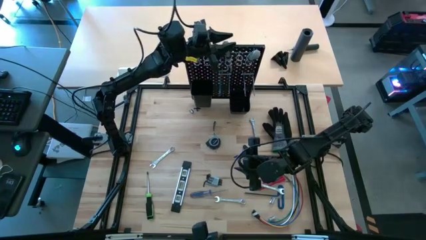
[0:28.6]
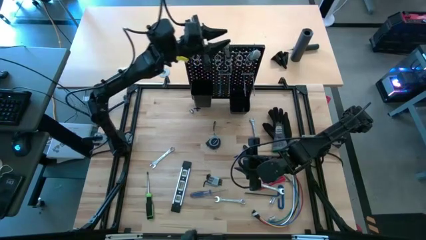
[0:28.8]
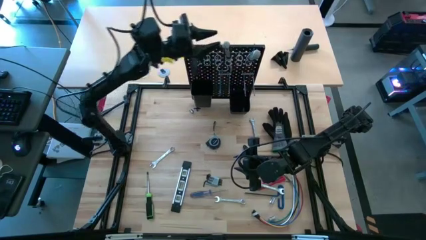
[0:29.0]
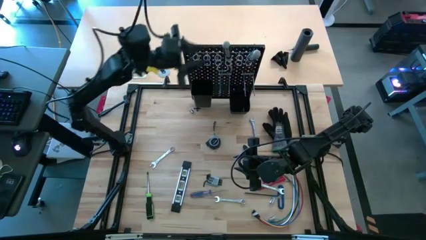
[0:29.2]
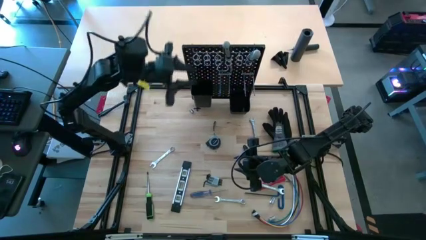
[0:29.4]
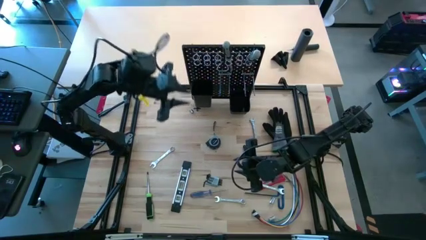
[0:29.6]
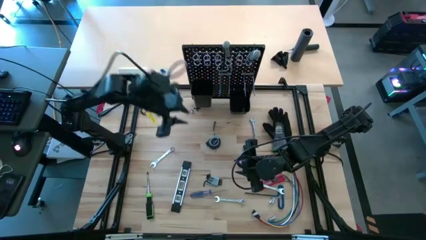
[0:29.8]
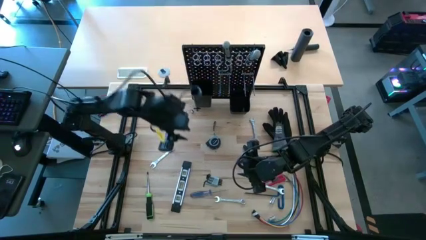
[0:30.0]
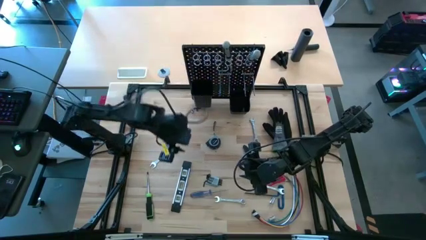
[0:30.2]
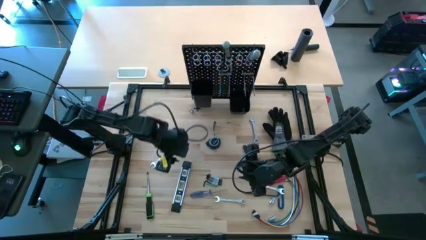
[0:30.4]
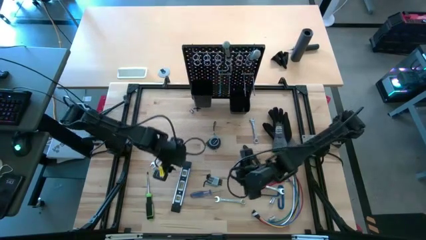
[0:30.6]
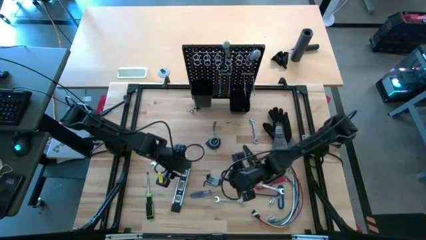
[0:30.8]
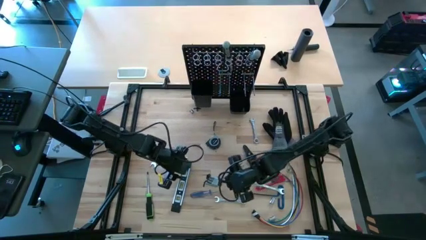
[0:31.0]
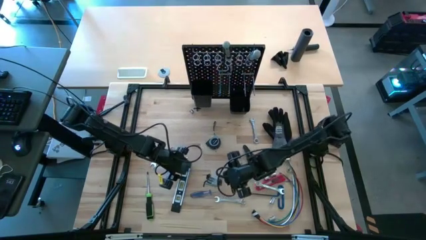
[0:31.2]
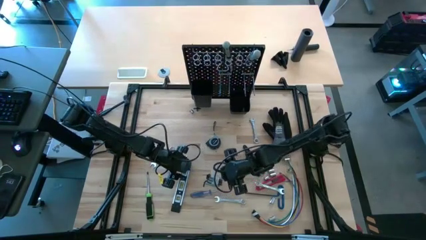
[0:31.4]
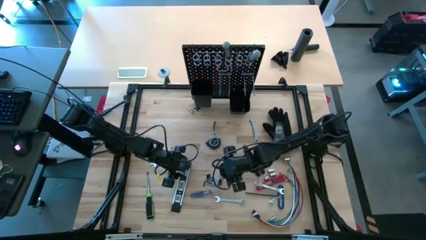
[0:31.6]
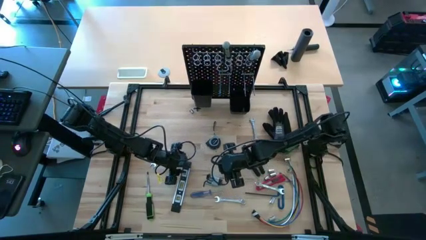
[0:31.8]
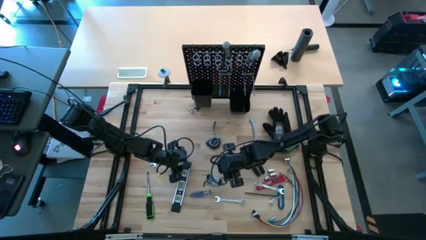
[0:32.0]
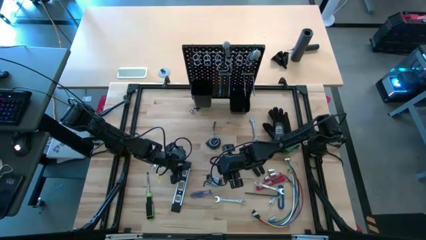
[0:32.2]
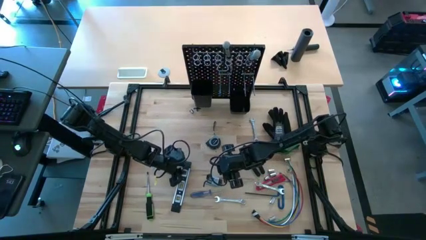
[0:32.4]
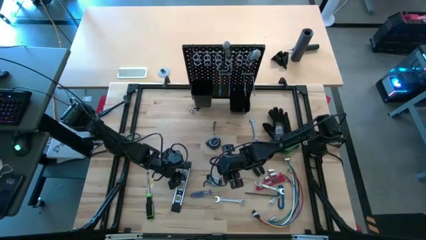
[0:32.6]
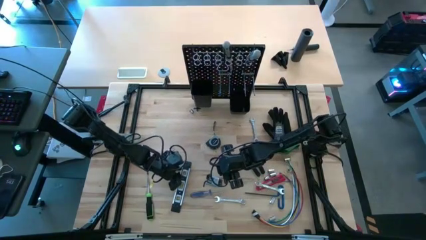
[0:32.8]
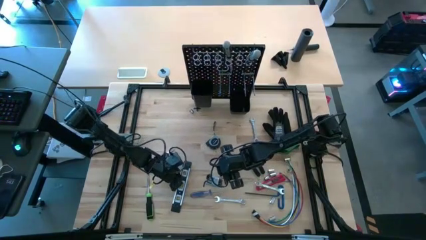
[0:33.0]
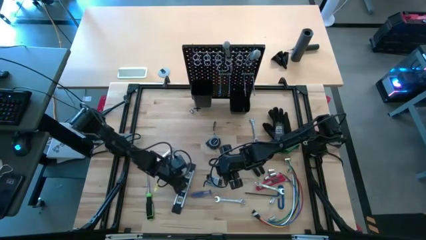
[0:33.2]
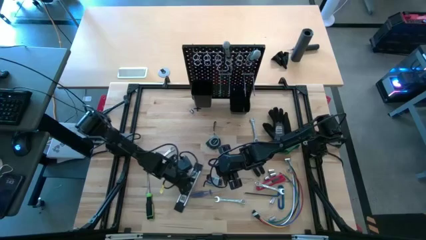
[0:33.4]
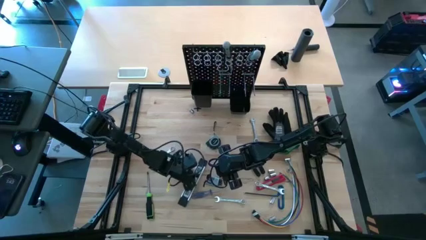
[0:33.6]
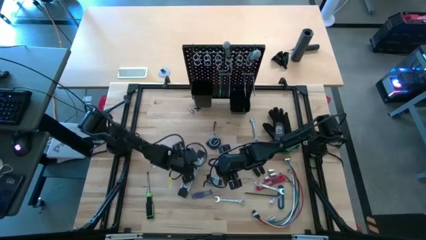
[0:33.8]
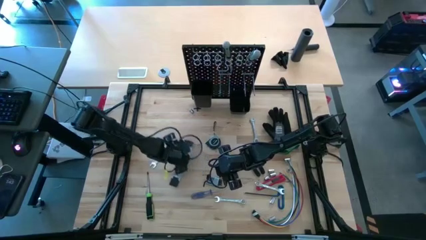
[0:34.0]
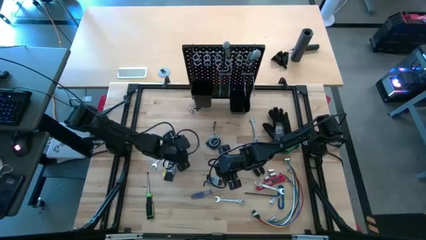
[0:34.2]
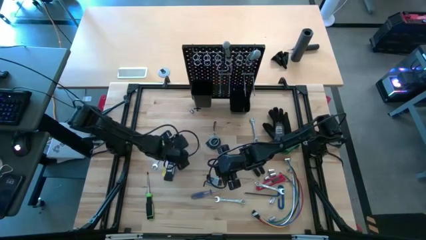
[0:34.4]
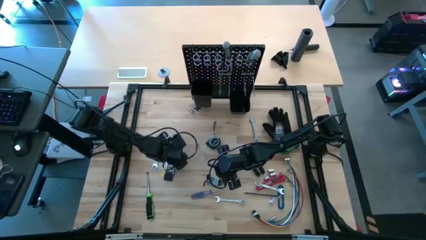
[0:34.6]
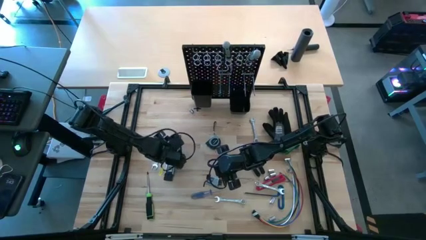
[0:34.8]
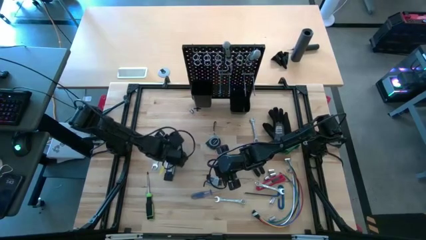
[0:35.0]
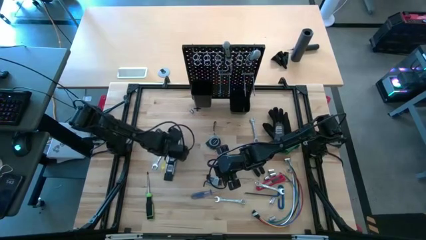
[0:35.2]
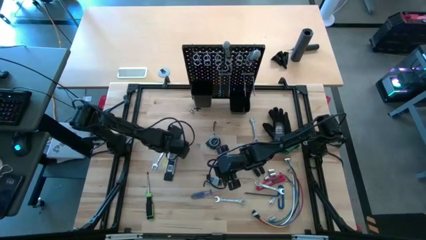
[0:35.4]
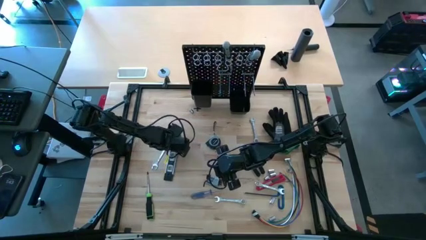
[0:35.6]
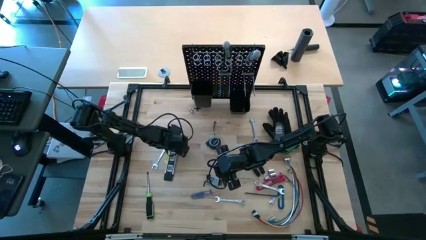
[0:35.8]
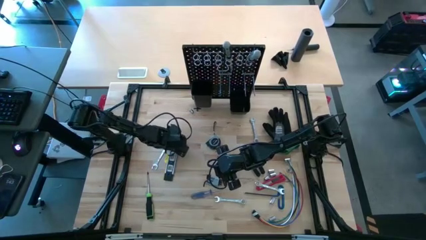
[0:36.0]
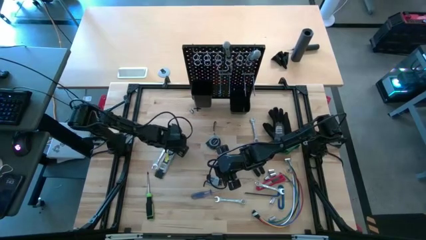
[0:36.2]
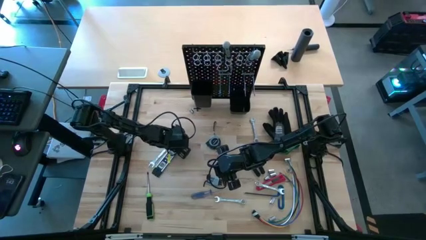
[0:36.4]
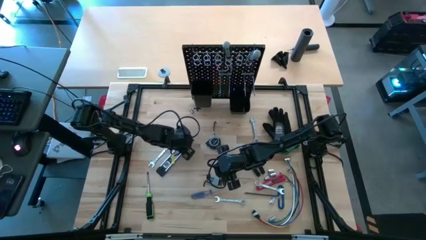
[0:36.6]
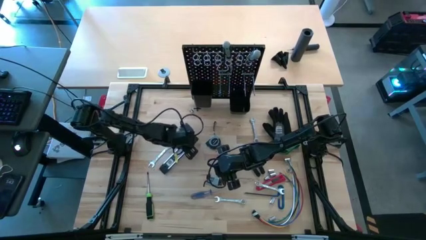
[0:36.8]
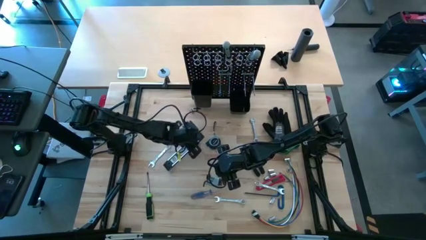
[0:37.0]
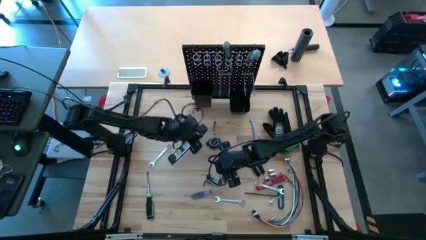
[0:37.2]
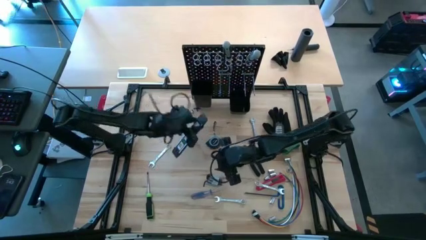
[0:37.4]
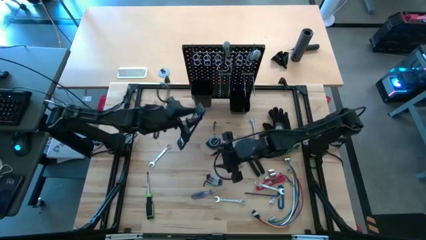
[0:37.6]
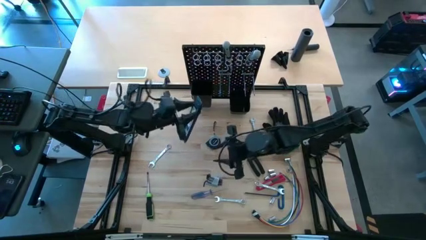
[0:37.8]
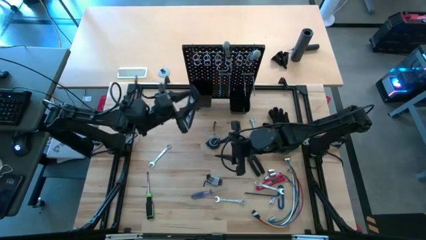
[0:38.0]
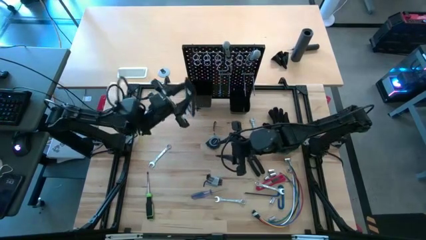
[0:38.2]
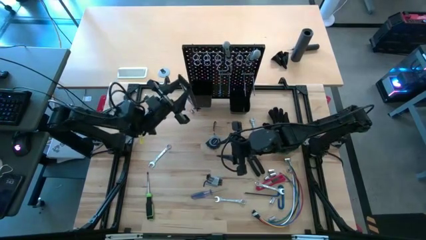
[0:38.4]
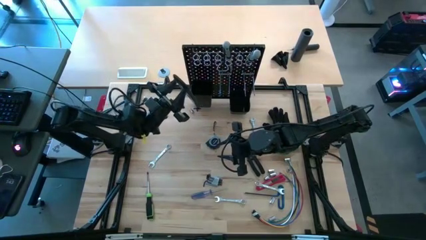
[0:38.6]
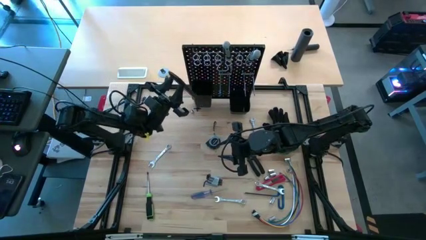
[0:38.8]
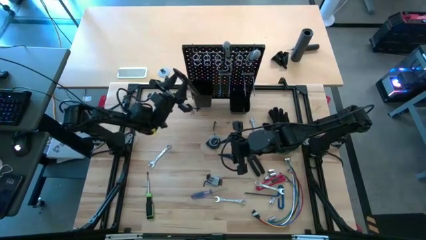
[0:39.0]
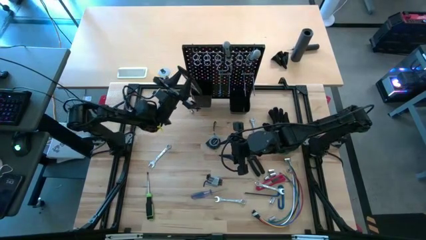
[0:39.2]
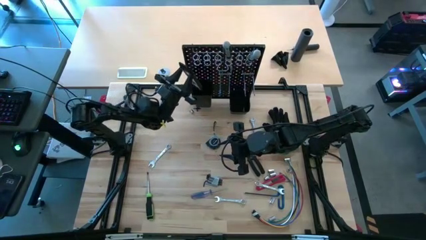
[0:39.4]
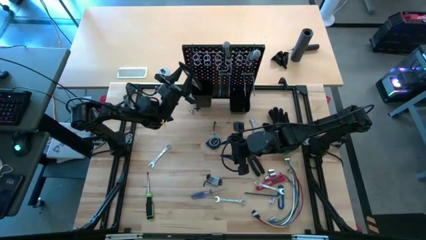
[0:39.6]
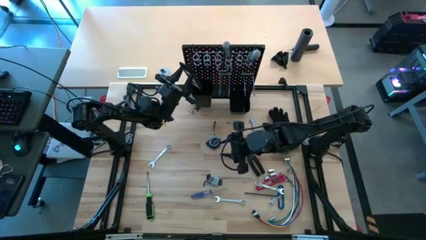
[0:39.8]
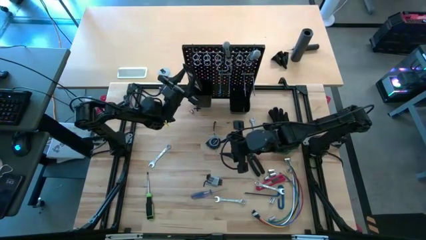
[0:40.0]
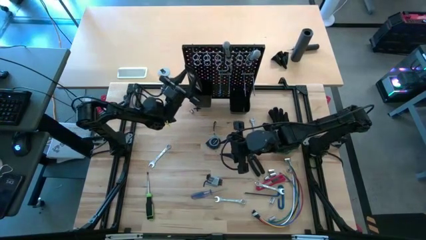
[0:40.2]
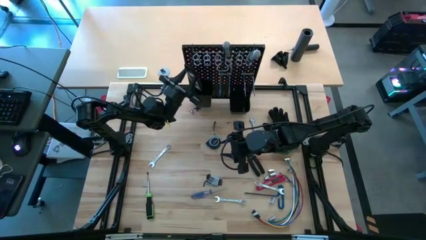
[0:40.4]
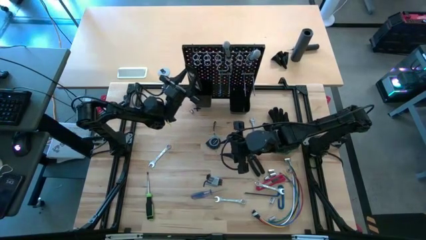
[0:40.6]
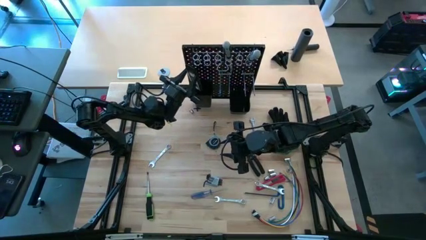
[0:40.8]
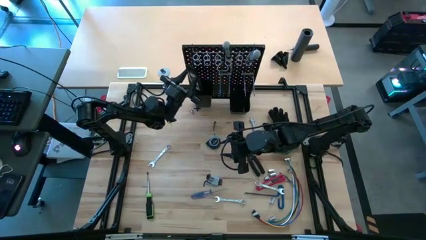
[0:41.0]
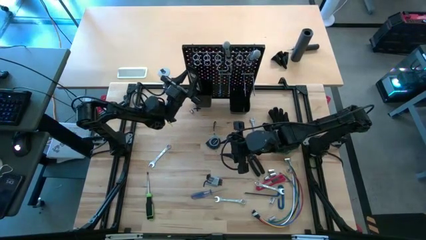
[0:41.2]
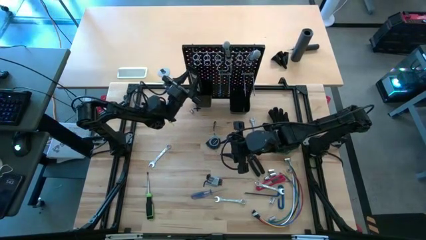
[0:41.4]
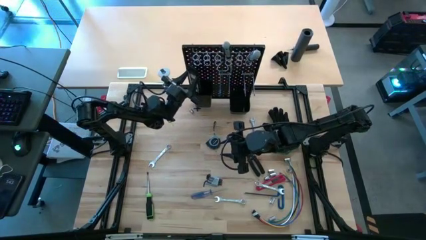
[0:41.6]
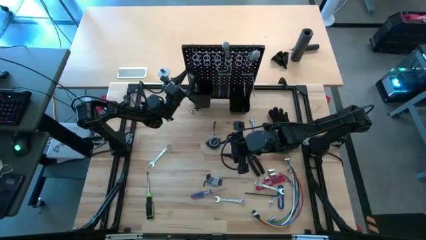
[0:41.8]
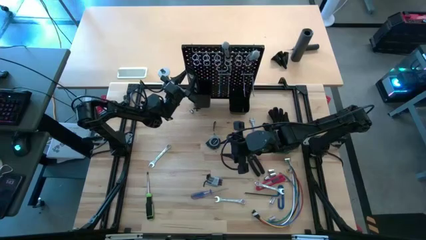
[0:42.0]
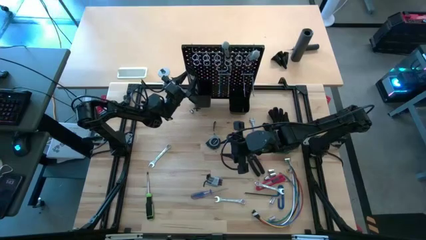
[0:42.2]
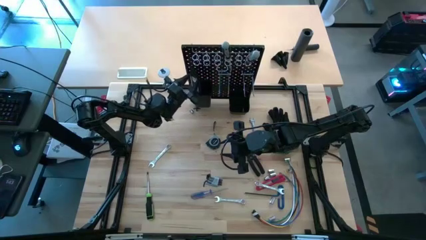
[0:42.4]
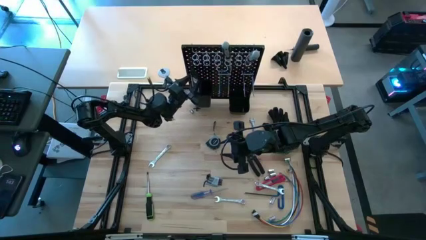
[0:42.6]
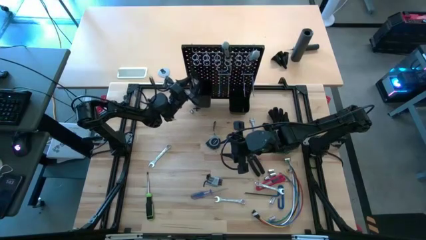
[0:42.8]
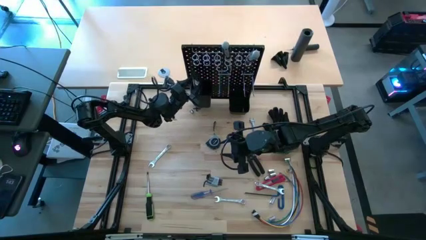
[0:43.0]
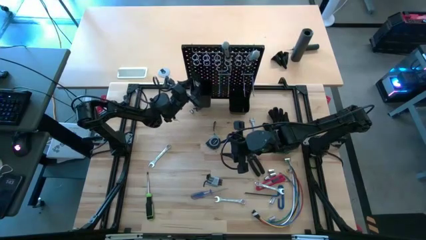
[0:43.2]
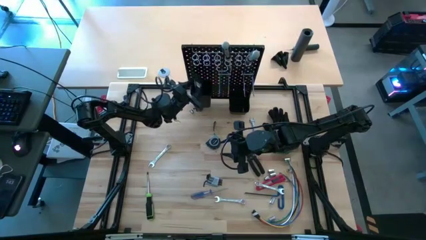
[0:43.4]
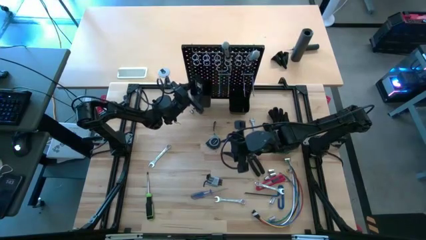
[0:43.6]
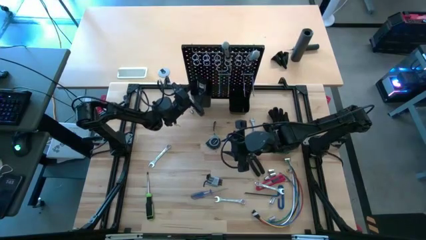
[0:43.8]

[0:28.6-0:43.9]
Task: Hang tools onto peg board
Put the black spirit level on the left black bin on the peg board
